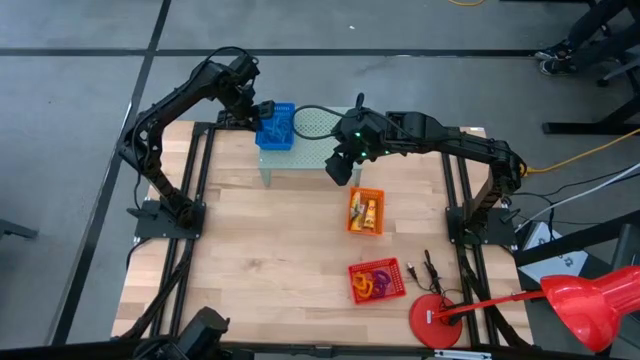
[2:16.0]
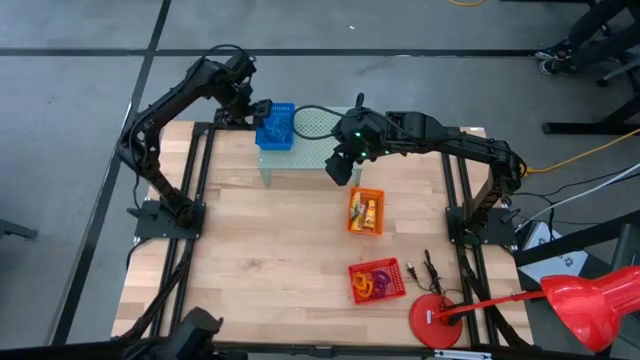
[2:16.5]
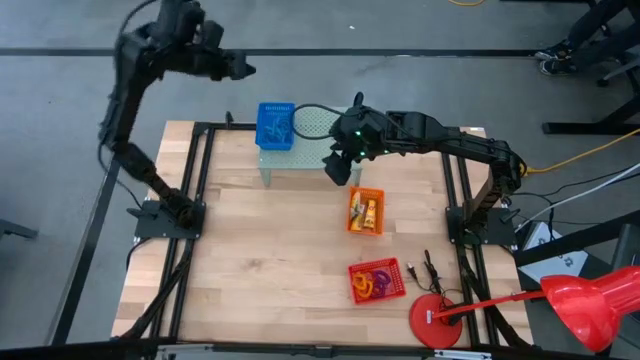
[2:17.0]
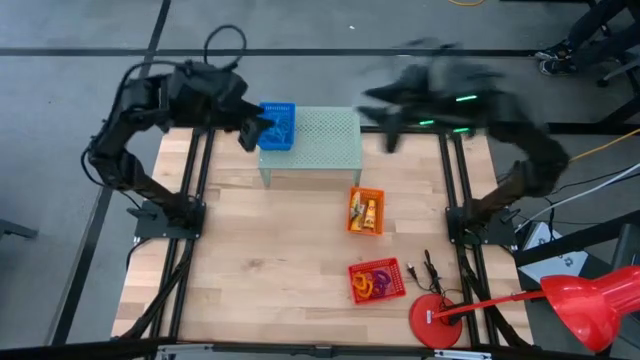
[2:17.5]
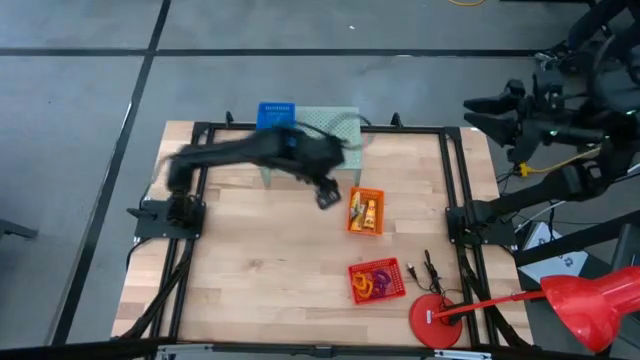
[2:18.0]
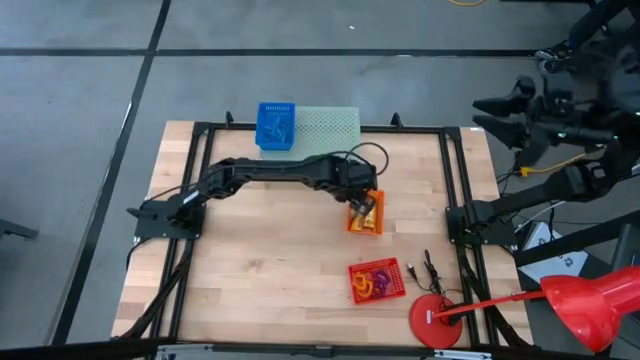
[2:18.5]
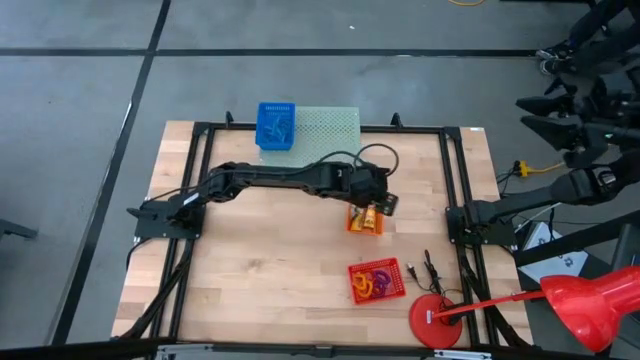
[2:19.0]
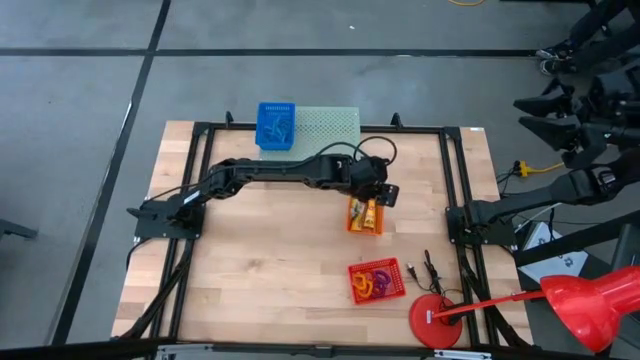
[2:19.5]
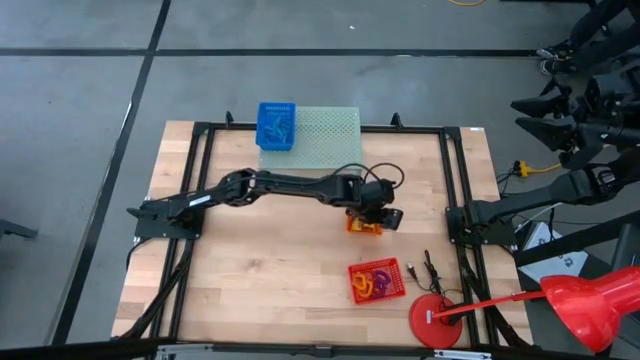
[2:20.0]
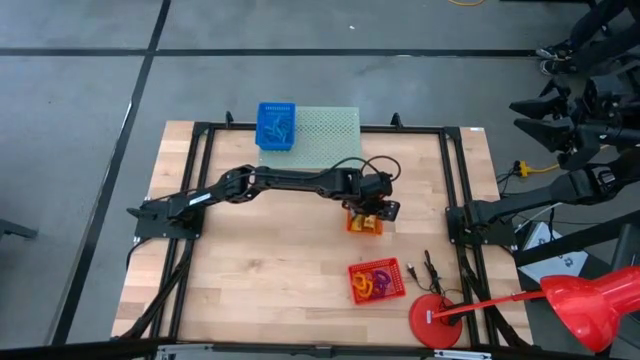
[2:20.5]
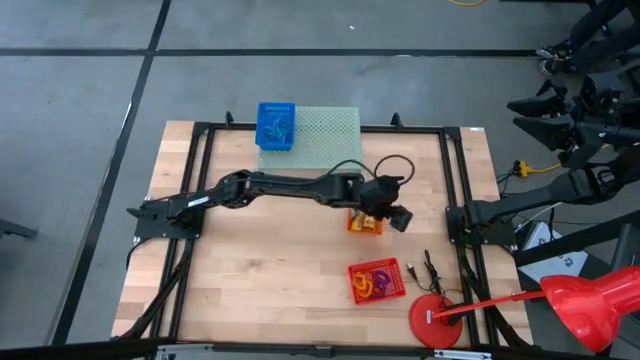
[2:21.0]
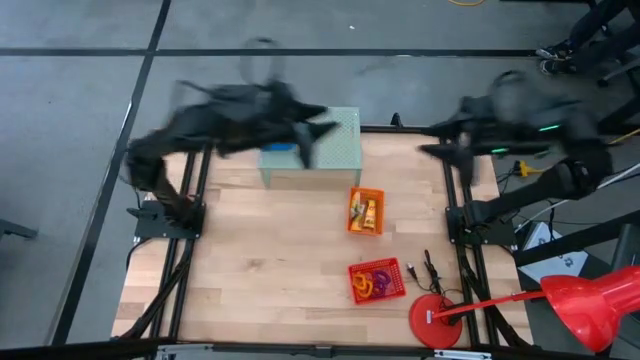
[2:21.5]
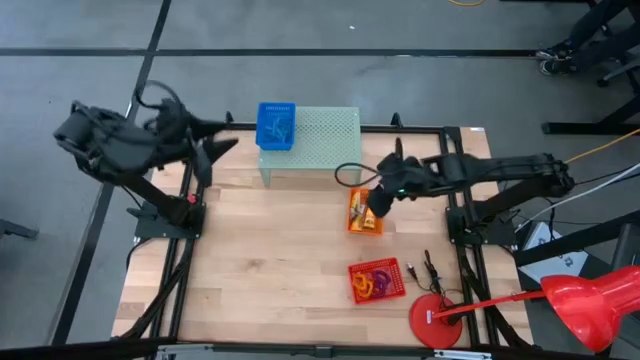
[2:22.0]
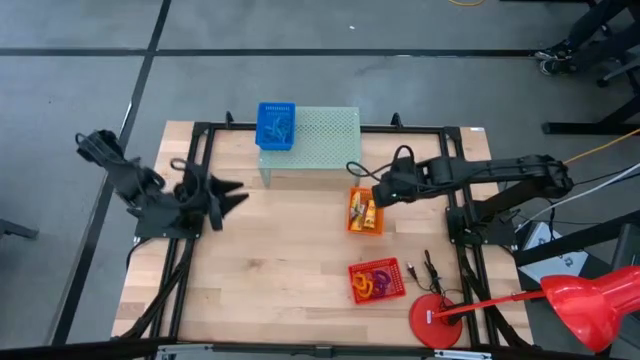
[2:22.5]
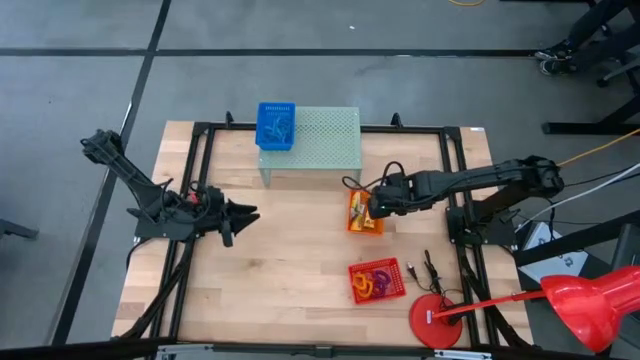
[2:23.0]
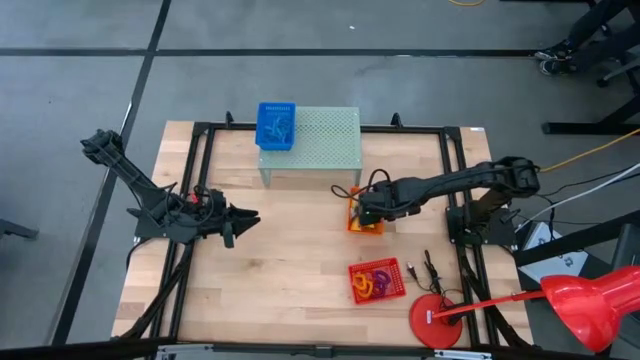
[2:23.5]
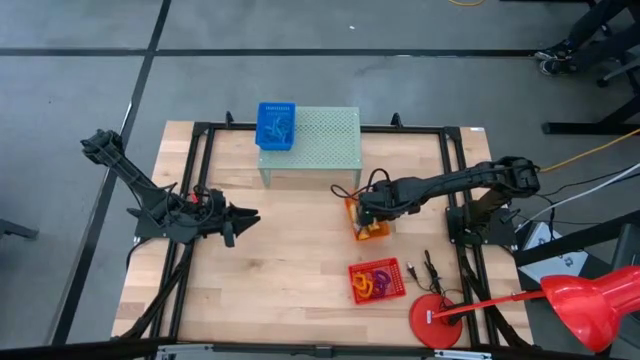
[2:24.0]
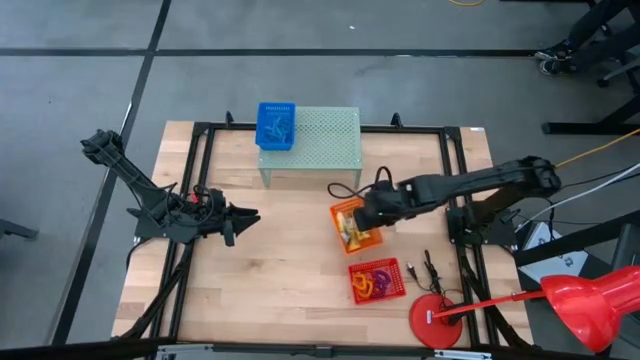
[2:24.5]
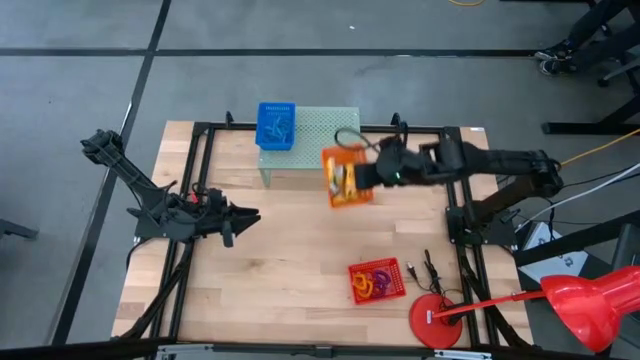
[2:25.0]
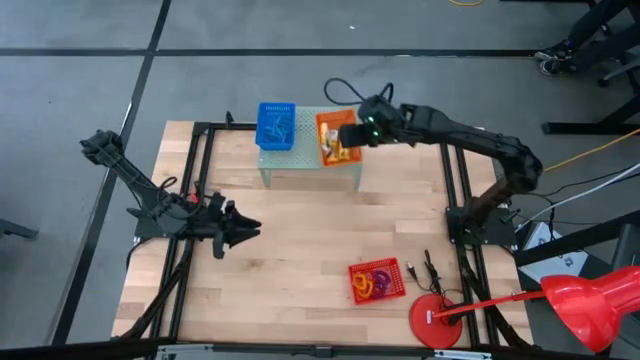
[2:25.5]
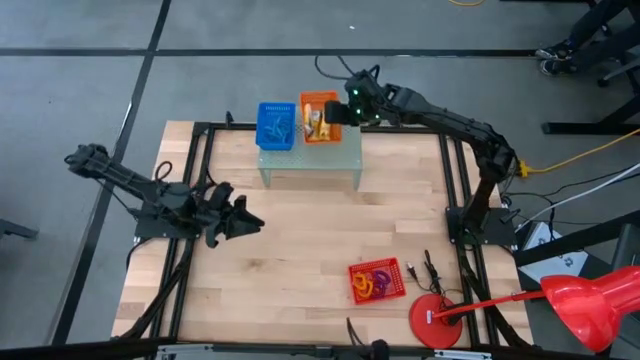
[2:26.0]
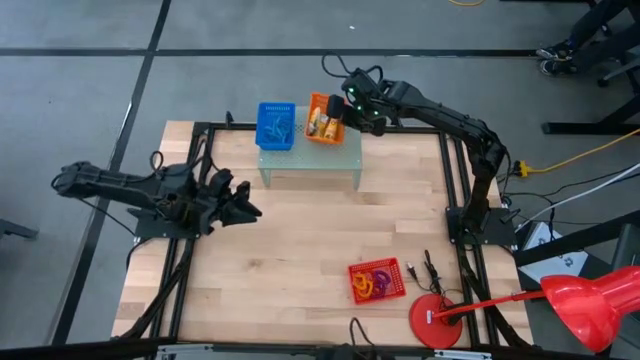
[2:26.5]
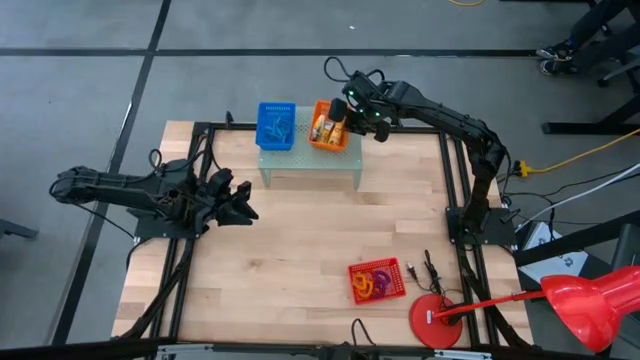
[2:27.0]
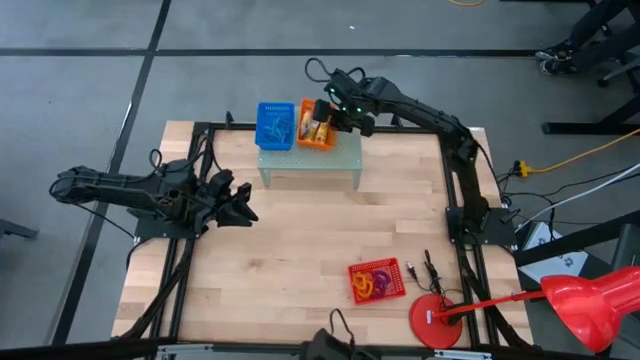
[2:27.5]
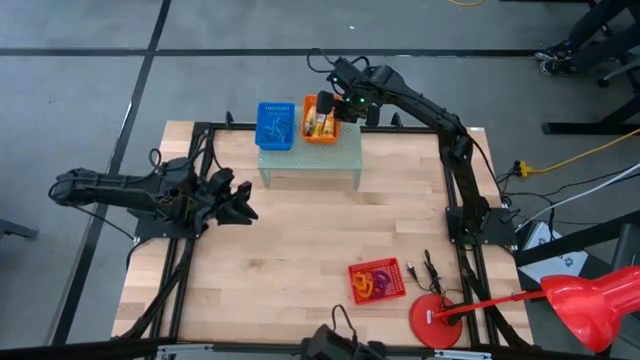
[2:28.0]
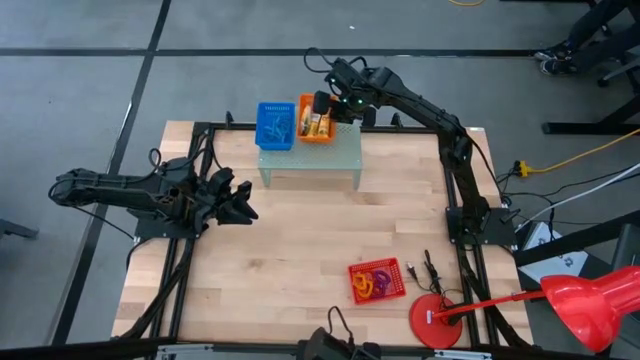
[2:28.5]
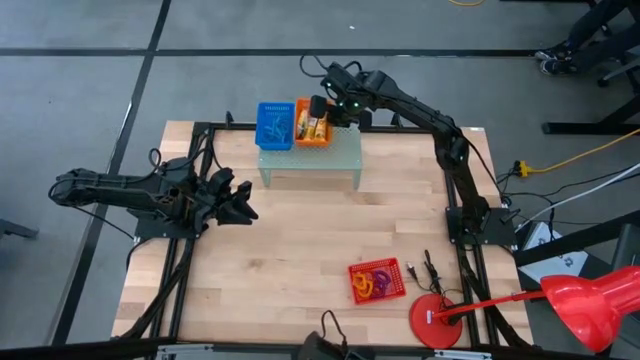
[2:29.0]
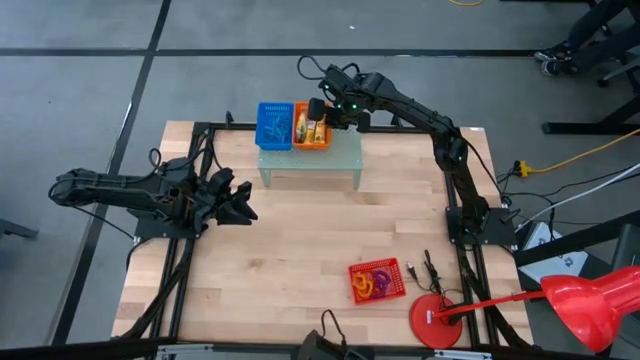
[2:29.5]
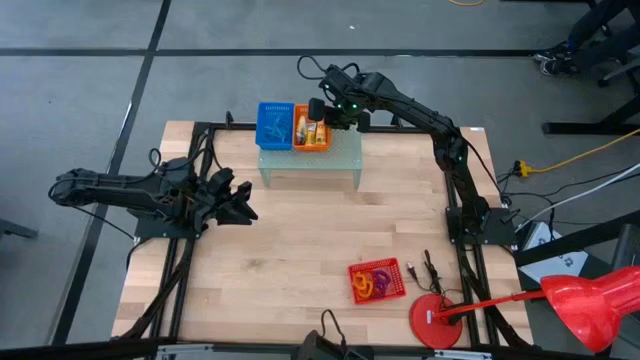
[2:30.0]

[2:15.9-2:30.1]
Task: Pick & Place Office Desk Supplies
Put the orange bin with crayon boxes on the shelf

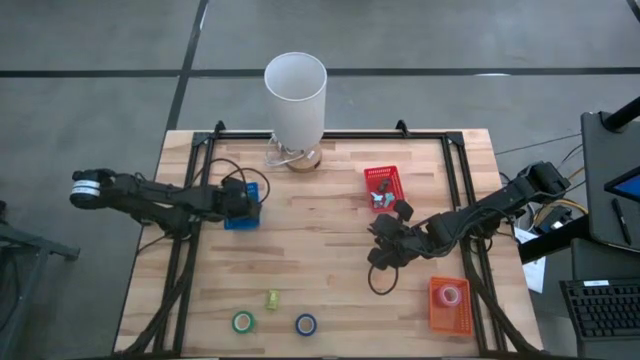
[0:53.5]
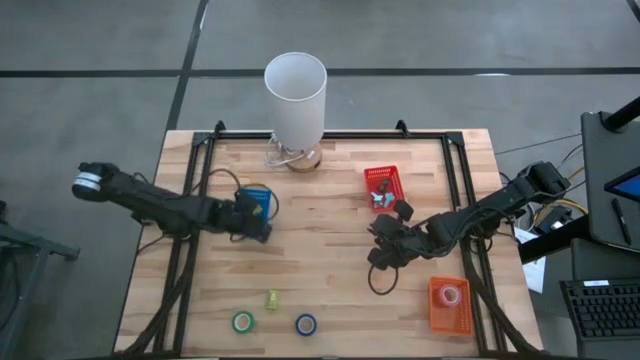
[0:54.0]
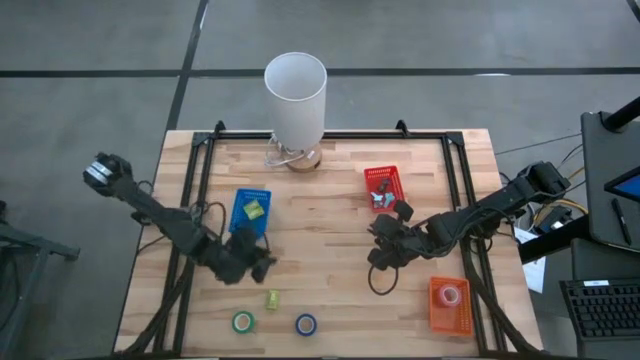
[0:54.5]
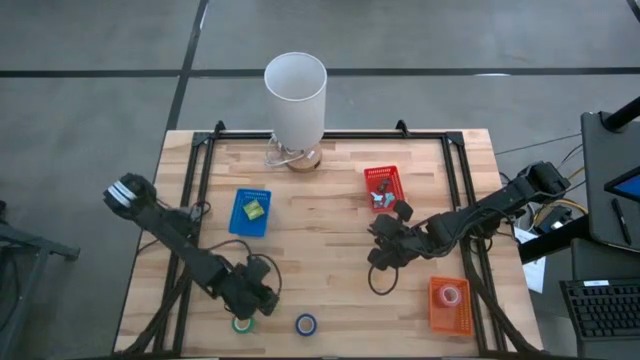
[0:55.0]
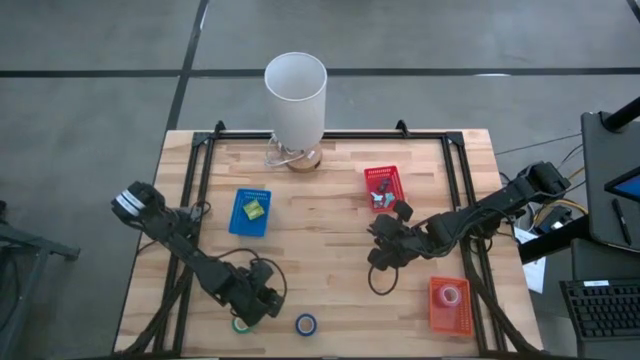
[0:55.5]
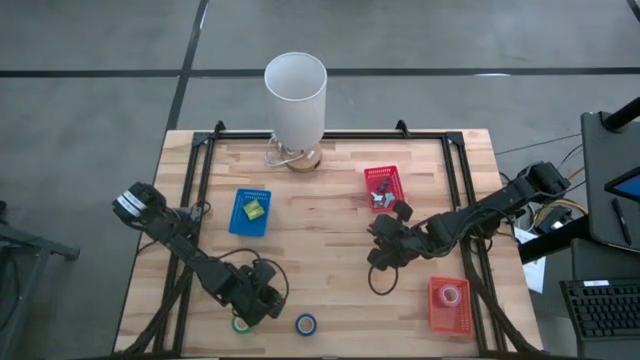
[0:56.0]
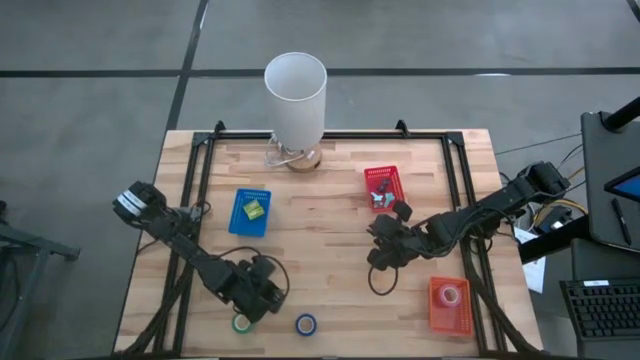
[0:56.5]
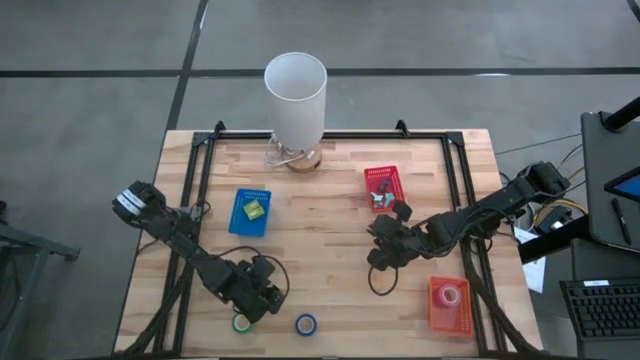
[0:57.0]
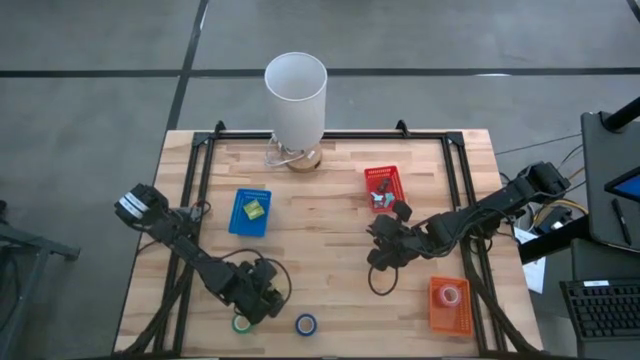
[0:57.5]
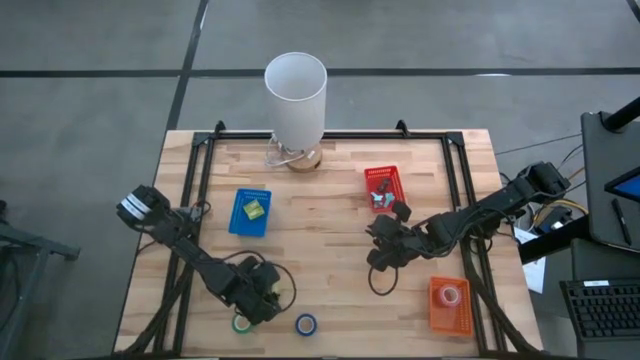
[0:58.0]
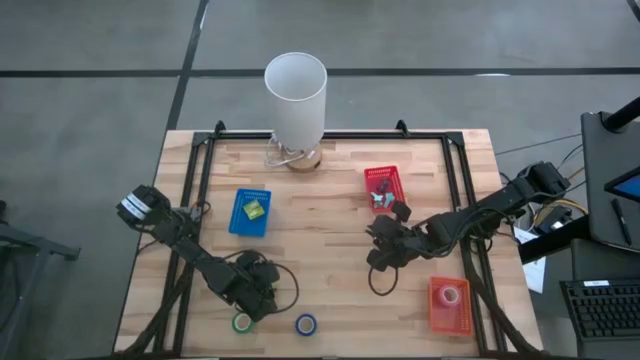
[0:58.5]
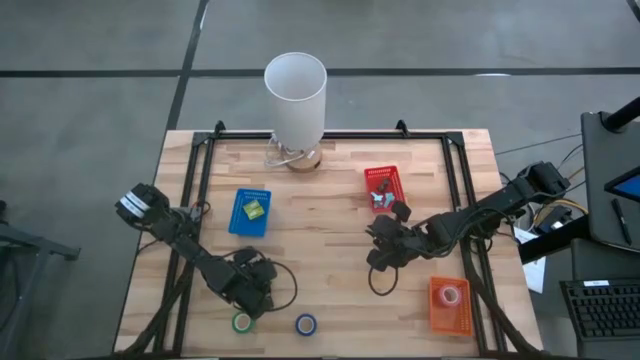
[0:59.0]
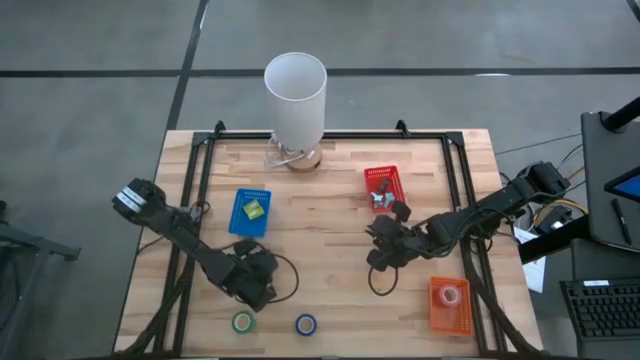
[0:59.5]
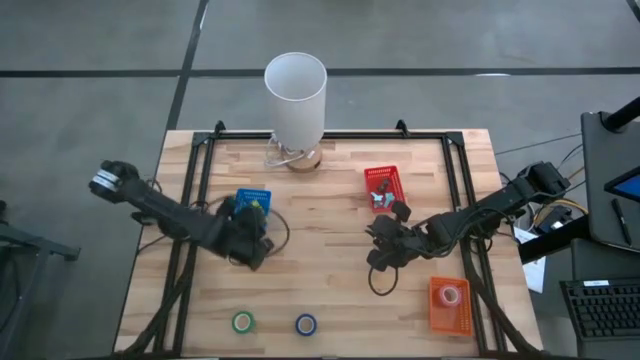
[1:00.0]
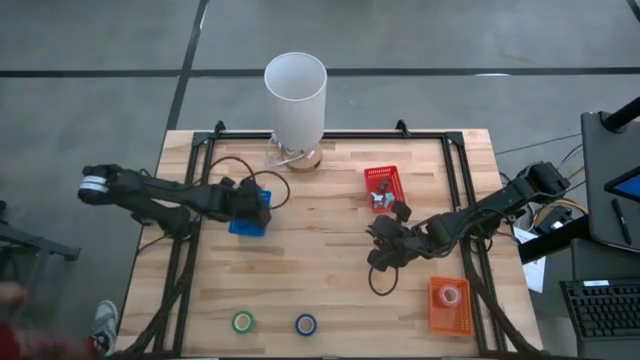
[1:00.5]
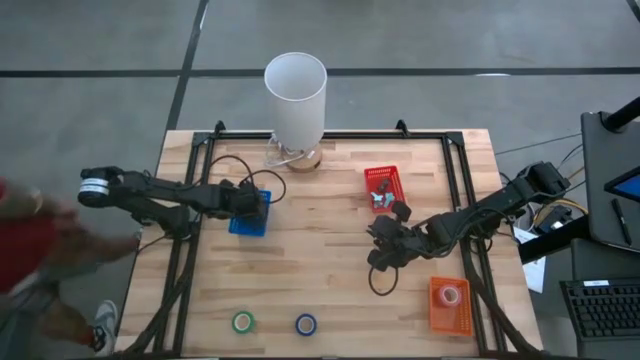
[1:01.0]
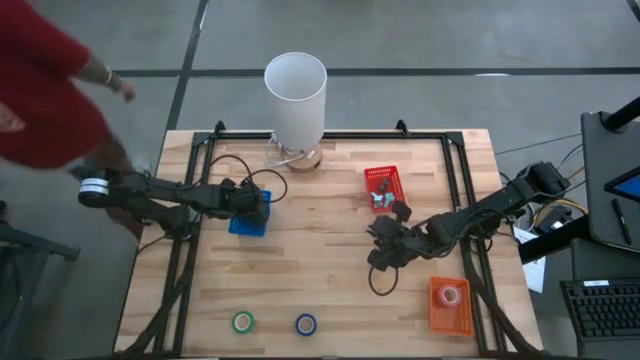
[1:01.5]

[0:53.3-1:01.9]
Task: Pick and place Stapler, Stapler remover, tape
Put the staple wire into the blue basket
